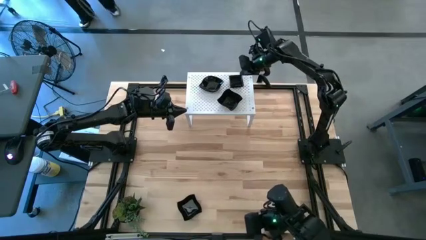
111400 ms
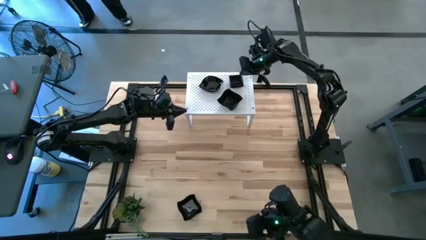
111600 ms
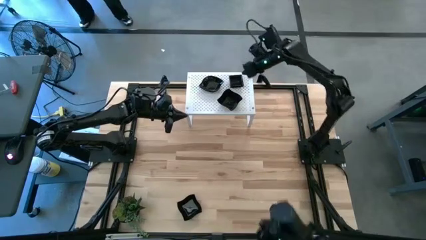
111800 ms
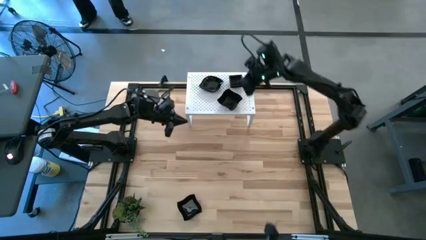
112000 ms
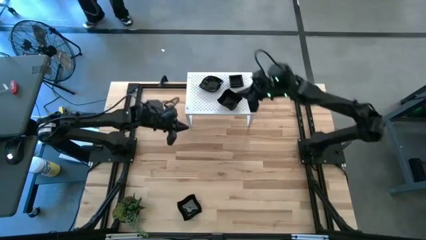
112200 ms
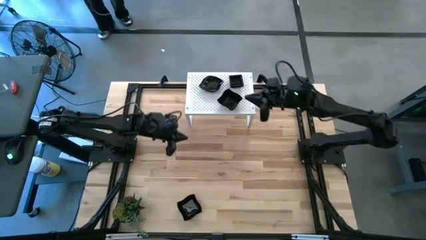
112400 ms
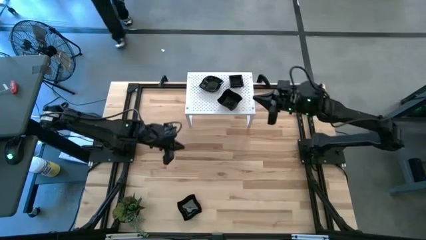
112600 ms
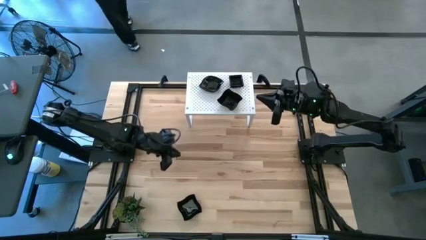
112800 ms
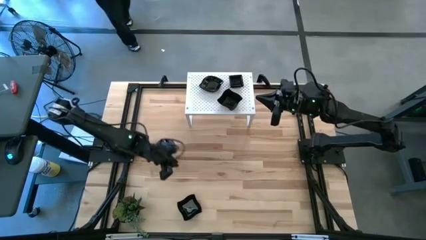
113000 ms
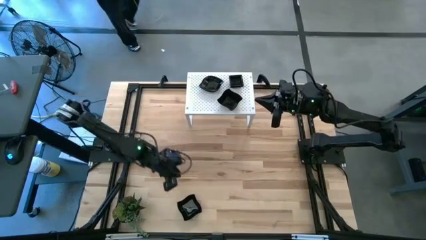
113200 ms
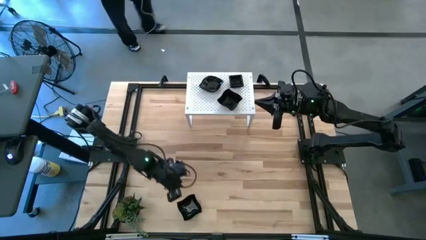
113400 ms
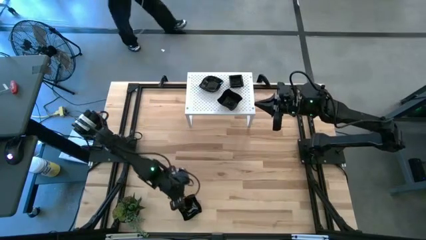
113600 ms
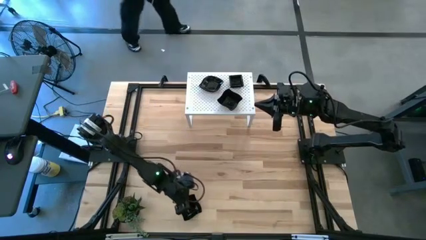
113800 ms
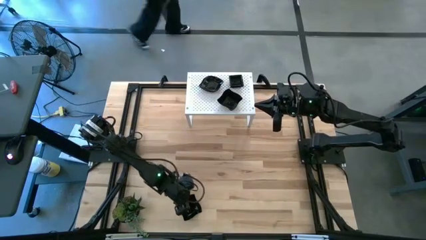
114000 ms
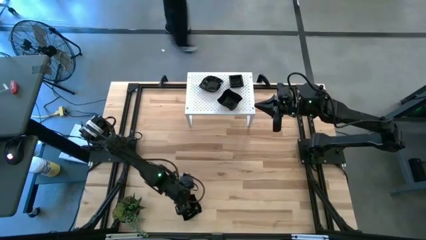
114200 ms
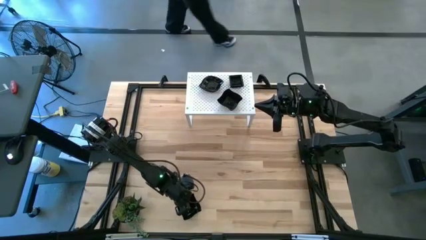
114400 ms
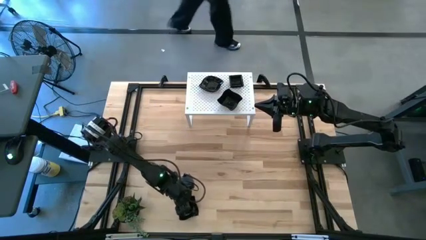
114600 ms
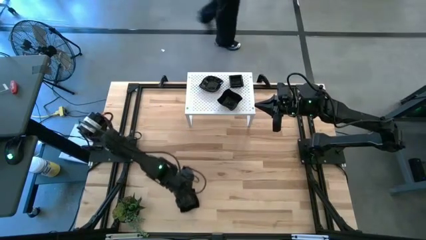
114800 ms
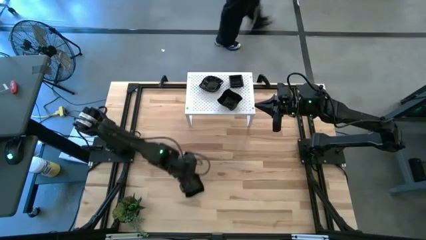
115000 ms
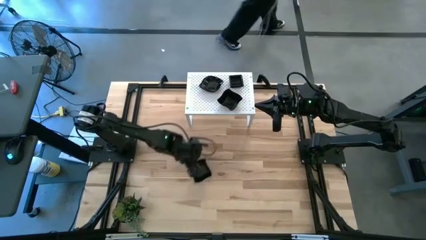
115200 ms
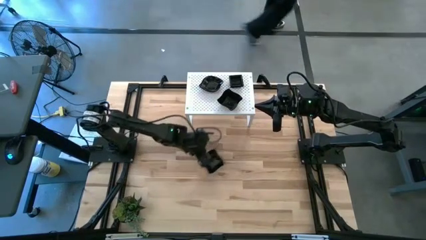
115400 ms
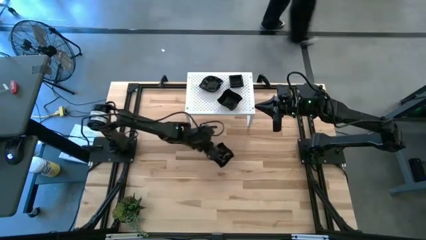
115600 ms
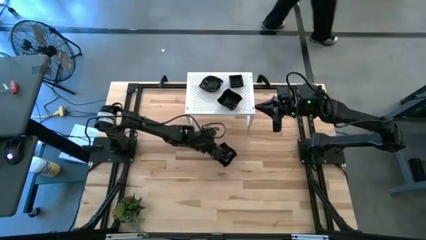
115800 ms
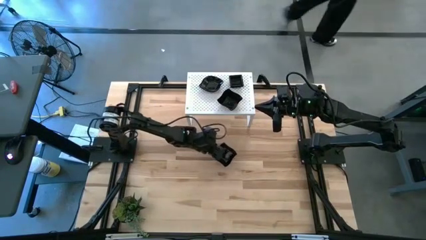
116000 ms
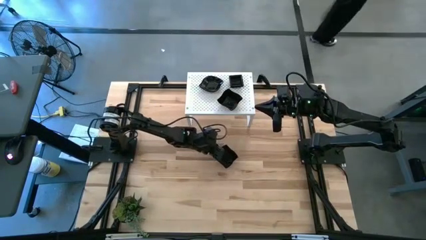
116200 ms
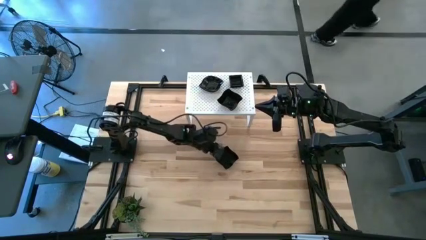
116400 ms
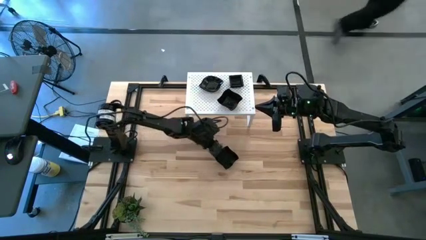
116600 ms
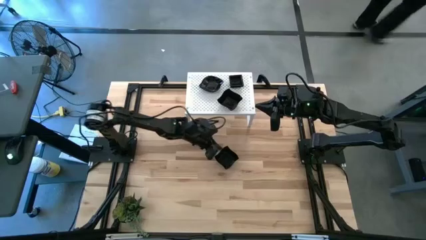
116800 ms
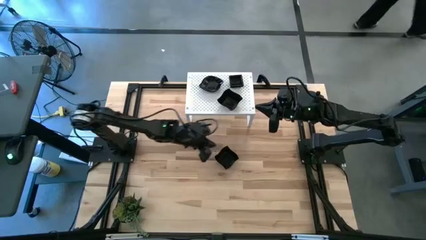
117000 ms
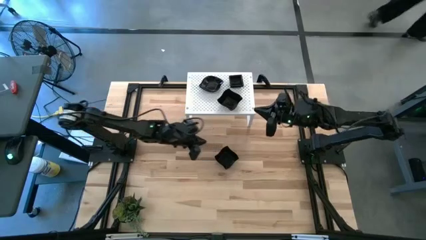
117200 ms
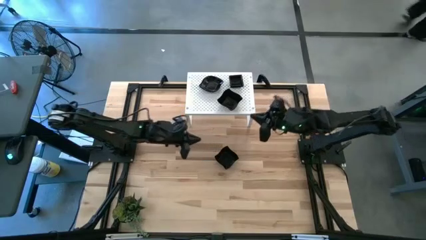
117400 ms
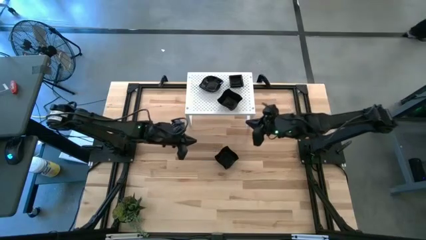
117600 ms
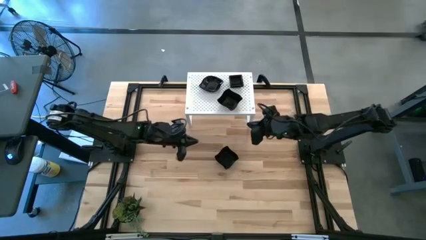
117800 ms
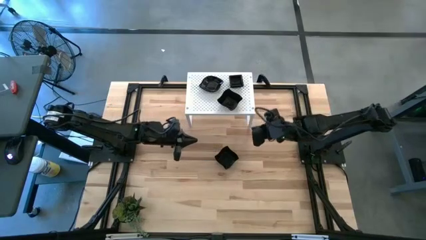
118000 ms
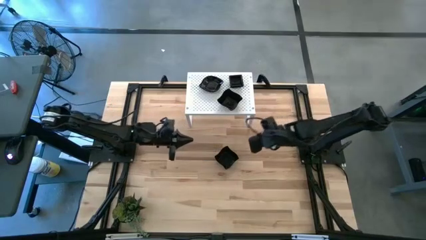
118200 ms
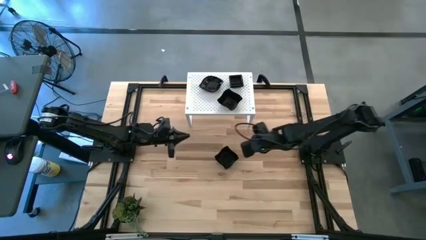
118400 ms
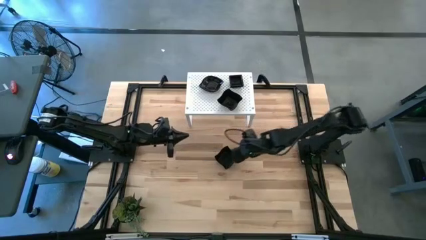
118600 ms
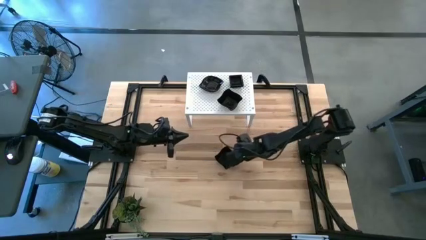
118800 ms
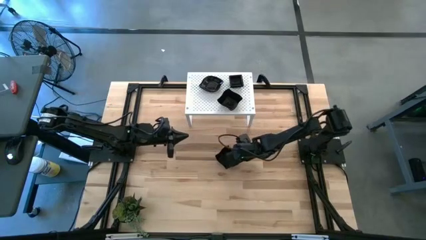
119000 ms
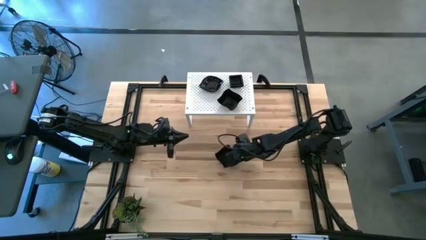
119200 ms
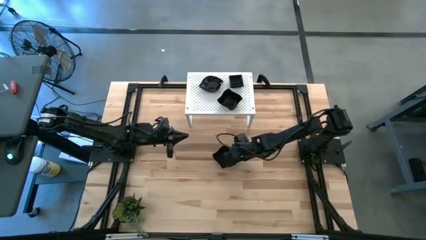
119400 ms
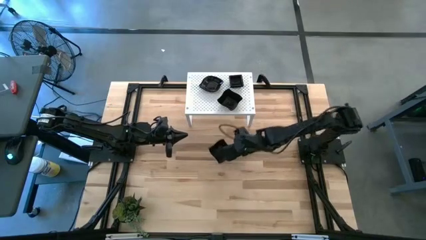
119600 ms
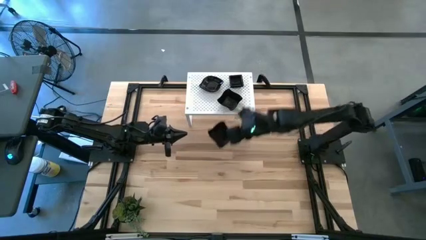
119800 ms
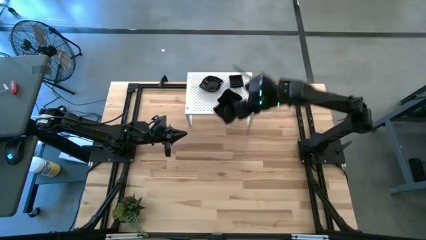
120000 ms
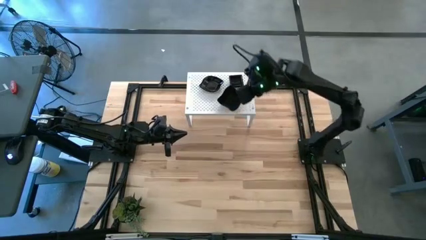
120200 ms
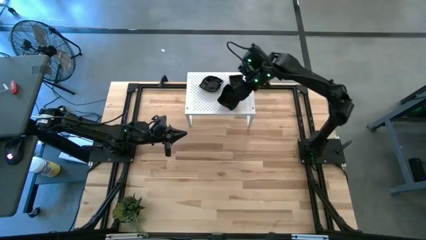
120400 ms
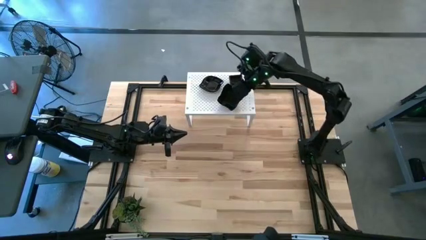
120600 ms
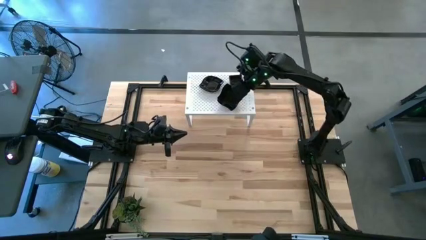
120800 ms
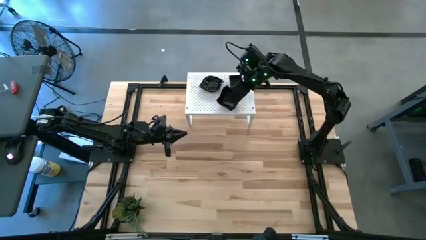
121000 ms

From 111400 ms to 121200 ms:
Task: Pick & Place Mini shaped plates
Stack the distorted square plate on top of the stacked distorted square plate on the shelf

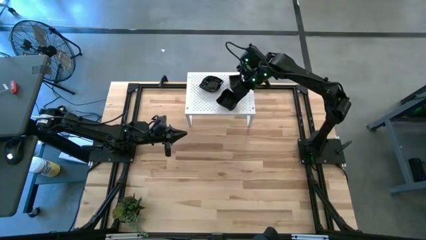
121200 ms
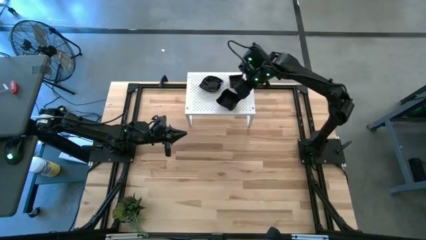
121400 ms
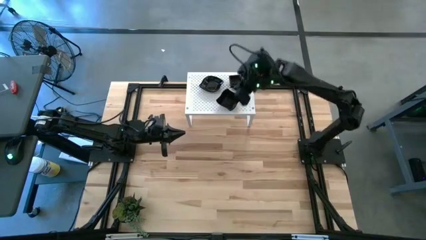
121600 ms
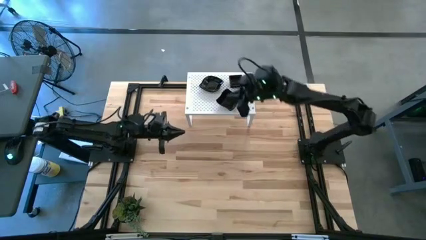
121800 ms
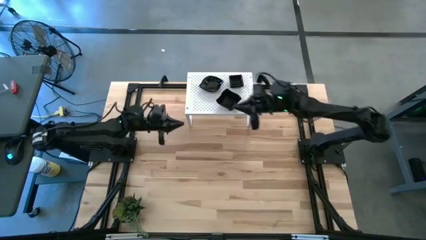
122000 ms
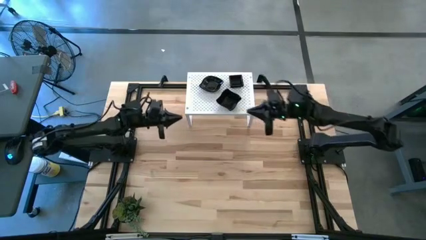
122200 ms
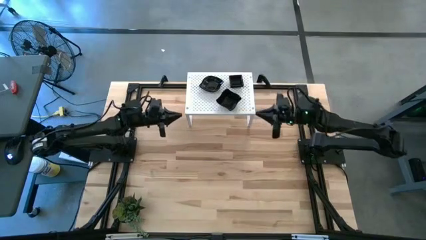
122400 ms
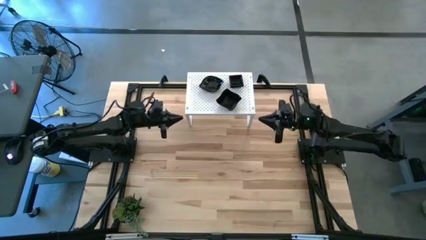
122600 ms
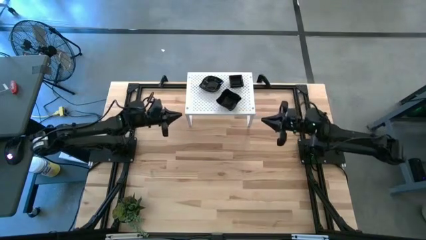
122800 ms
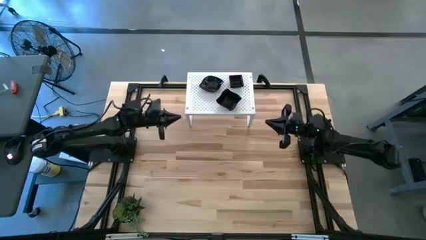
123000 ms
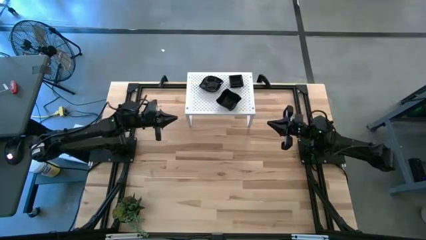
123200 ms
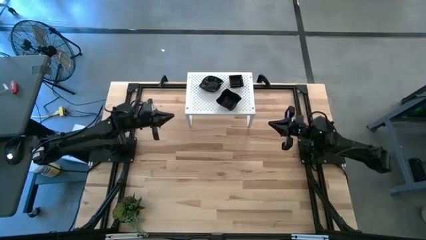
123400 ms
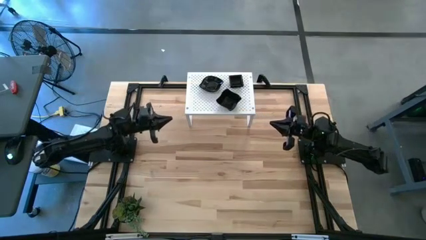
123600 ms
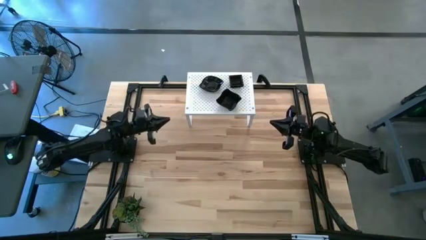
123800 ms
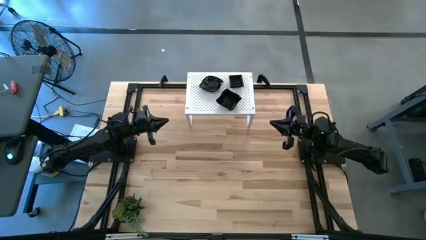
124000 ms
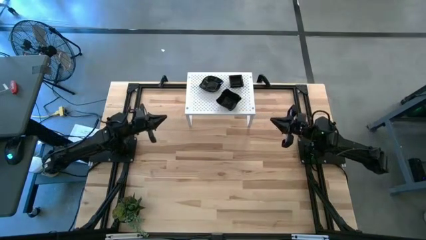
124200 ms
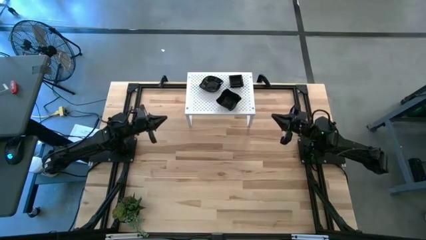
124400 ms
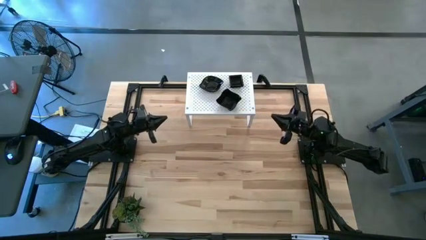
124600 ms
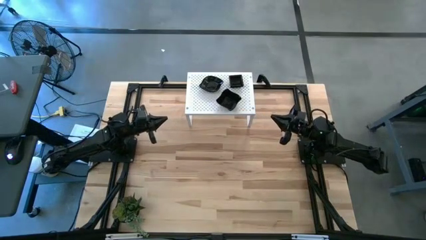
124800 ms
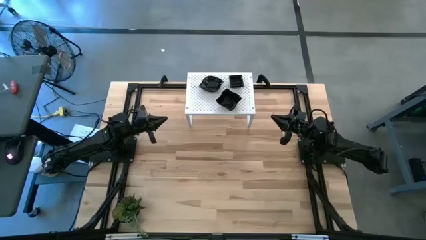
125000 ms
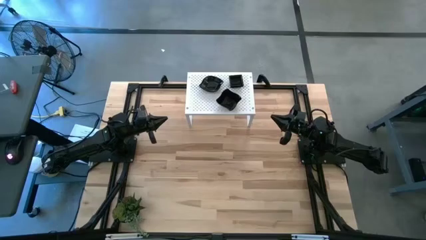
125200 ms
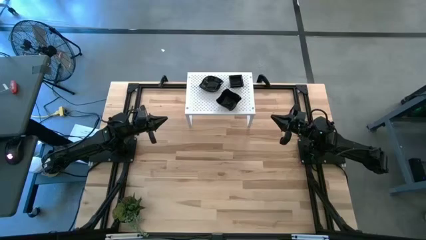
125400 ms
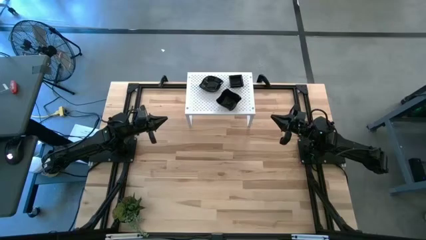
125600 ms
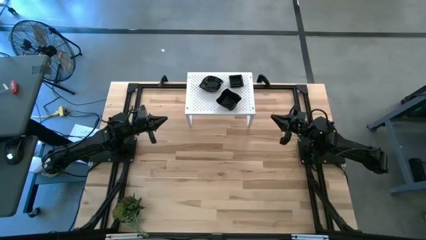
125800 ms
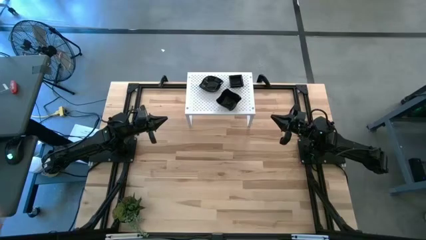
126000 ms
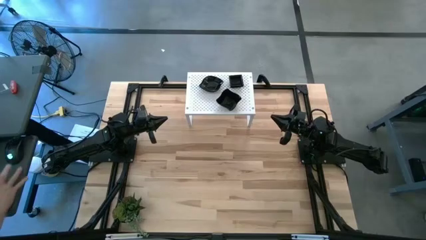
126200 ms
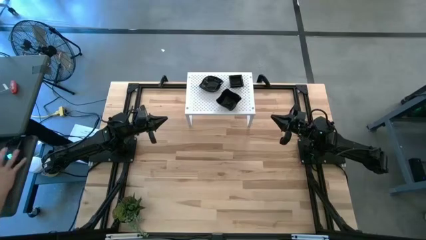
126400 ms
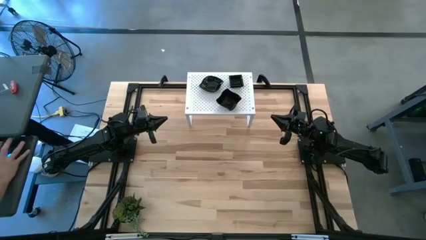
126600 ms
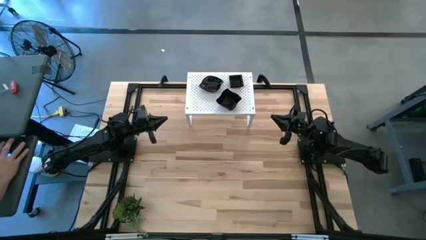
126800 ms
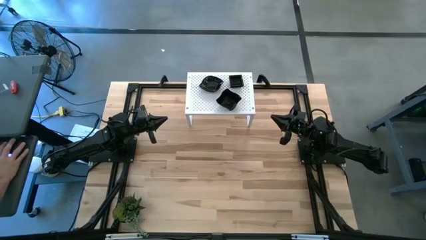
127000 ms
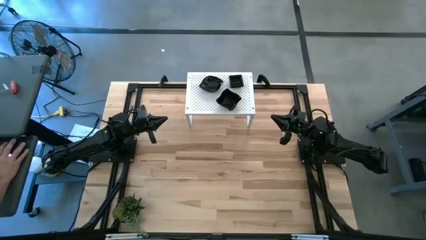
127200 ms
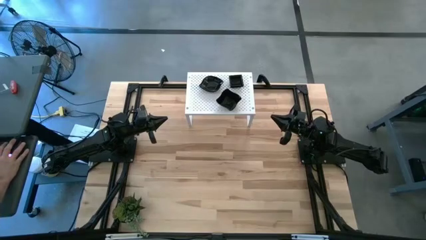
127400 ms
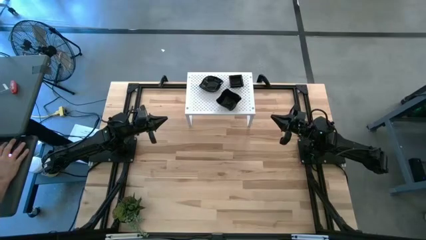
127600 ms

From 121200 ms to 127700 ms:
Return to Home Position

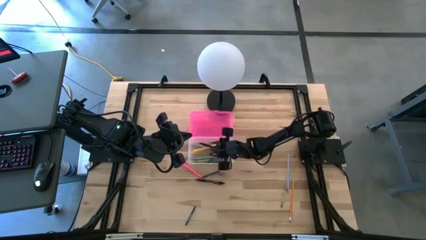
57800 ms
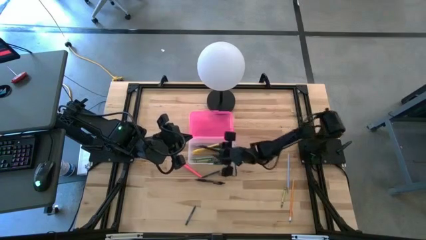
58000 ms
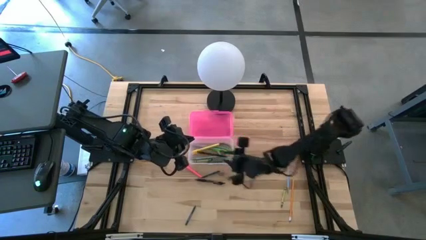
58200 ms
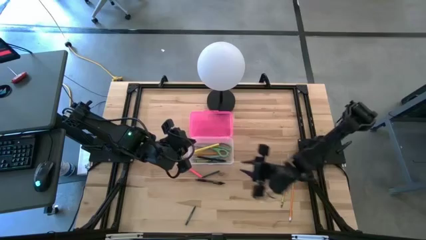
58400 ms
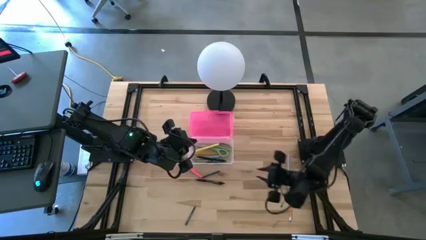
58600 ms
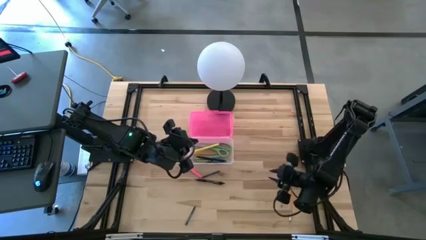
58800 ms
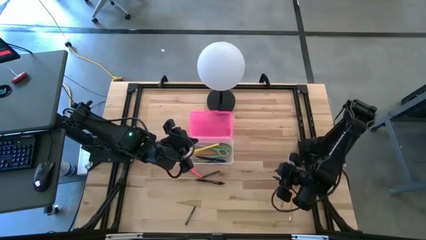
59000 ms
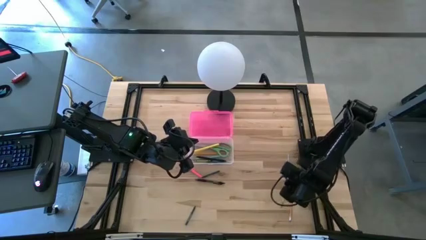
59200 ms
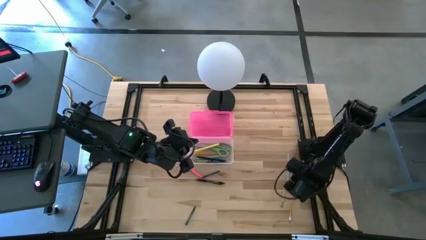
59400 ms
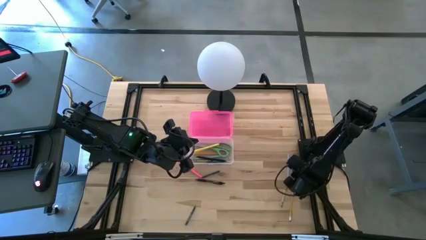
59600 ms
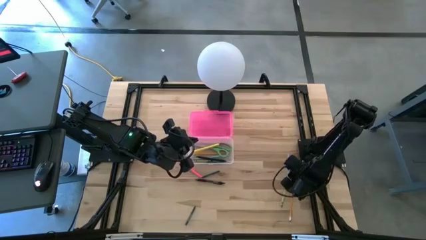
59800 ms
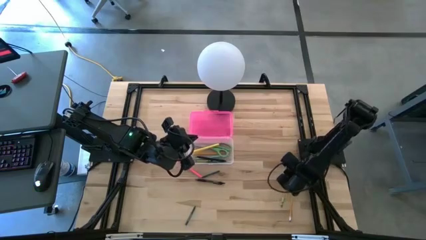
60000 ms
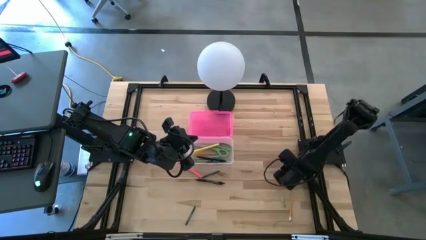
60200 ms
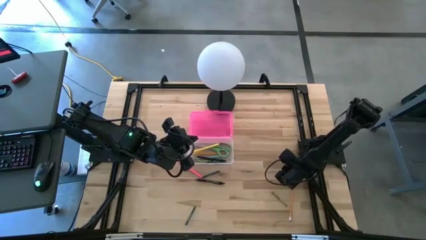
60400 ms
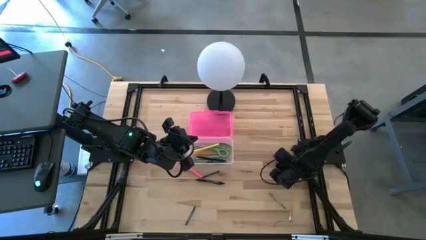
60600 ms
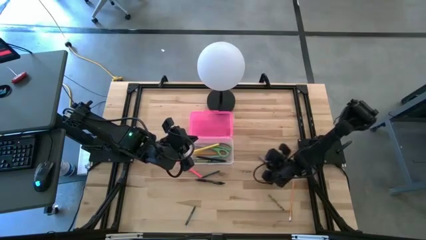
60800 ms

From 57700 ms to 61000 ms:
Task: Pick & place school supplies into a supply box
Put the light blue pencil into the pink supply box
